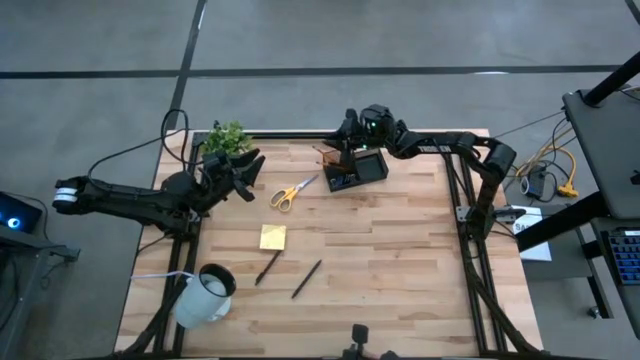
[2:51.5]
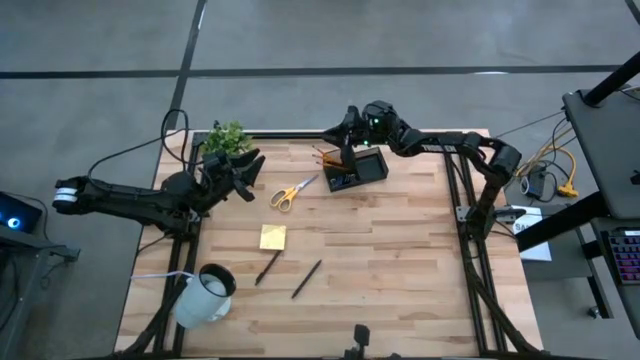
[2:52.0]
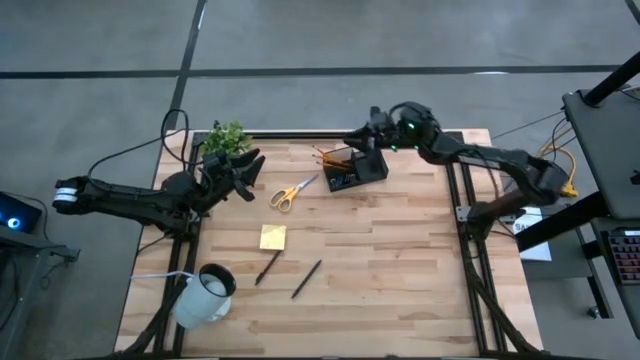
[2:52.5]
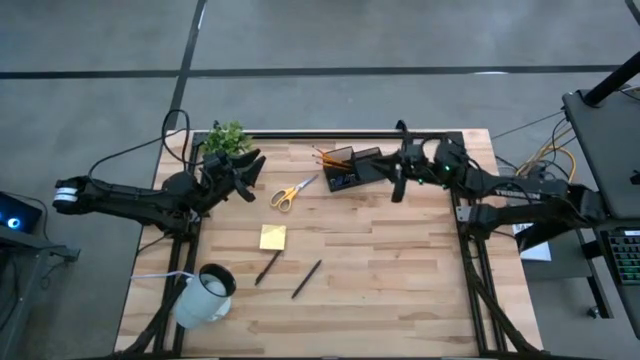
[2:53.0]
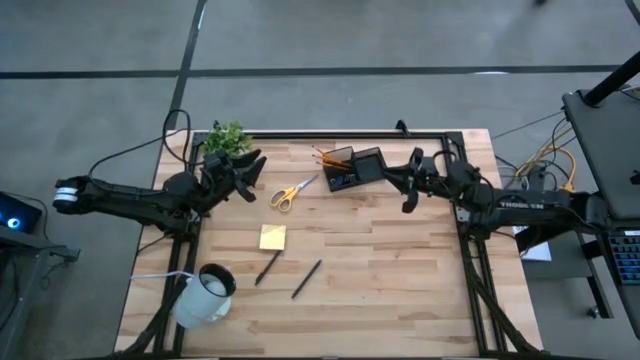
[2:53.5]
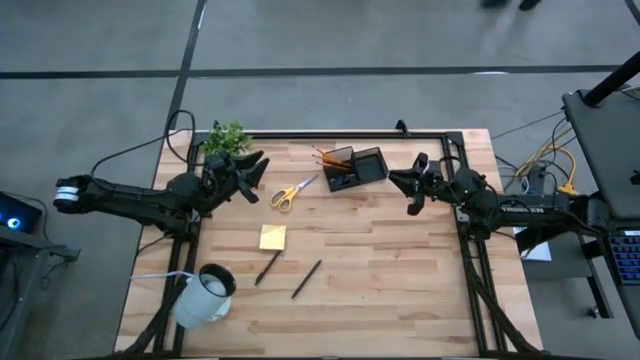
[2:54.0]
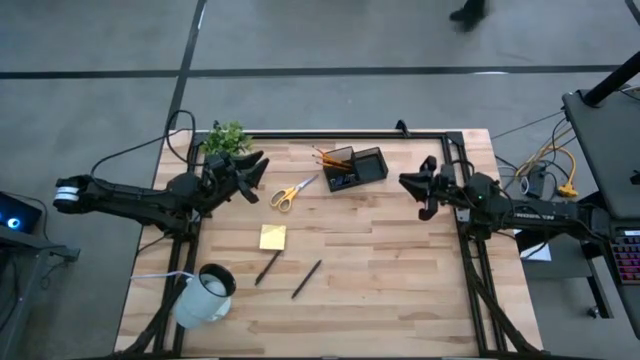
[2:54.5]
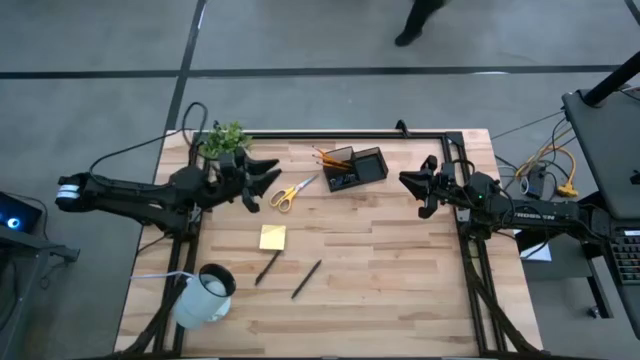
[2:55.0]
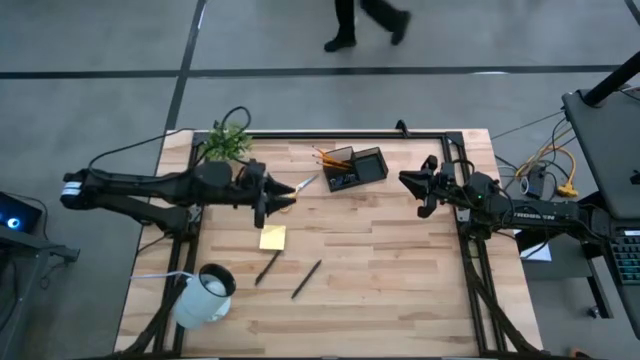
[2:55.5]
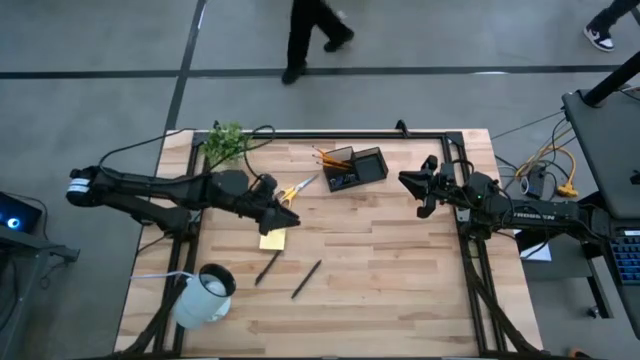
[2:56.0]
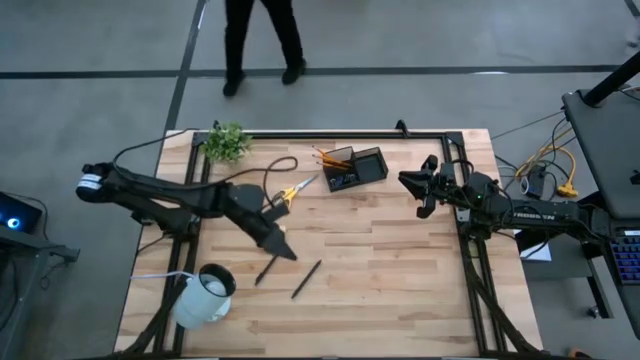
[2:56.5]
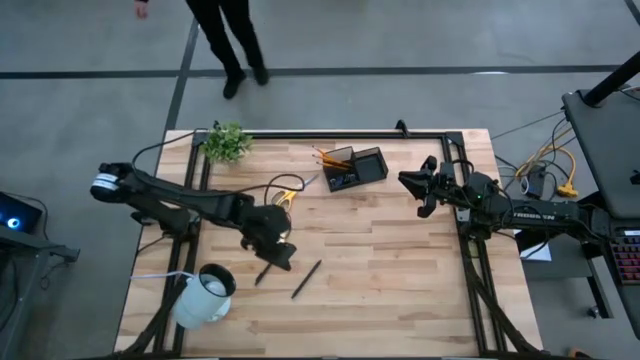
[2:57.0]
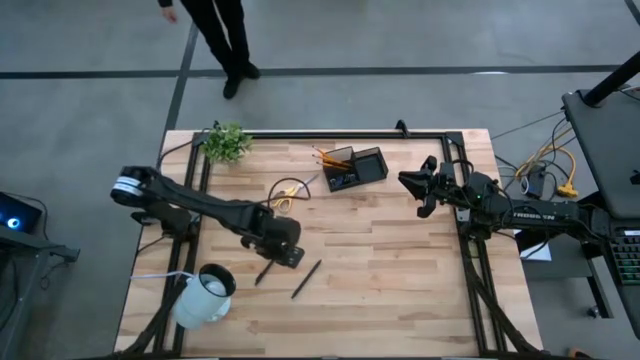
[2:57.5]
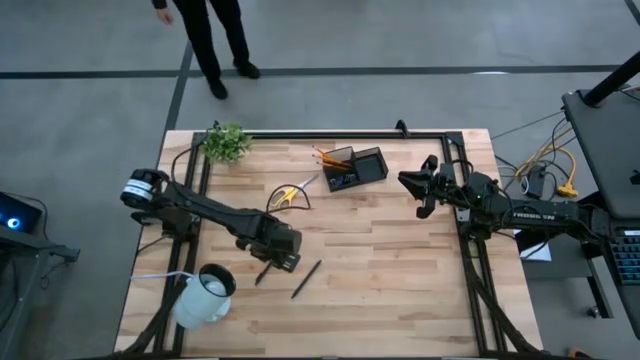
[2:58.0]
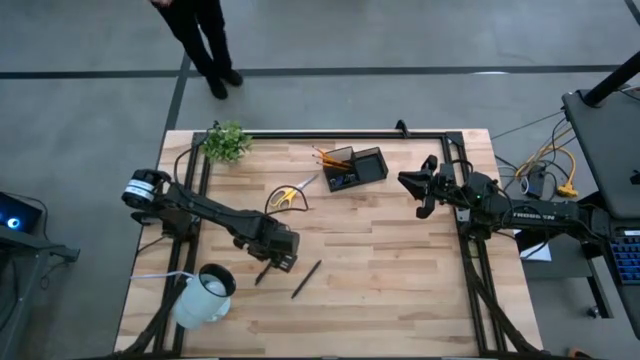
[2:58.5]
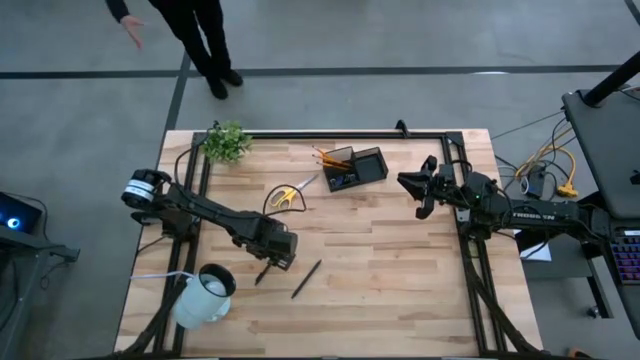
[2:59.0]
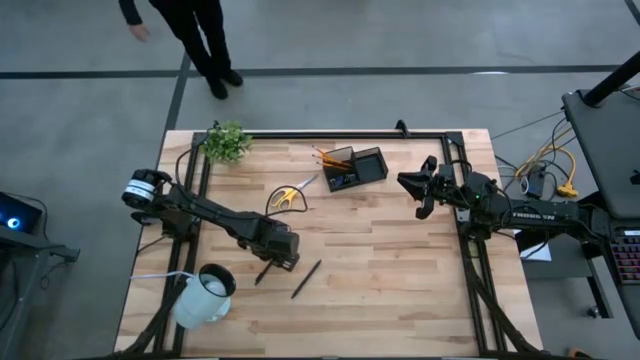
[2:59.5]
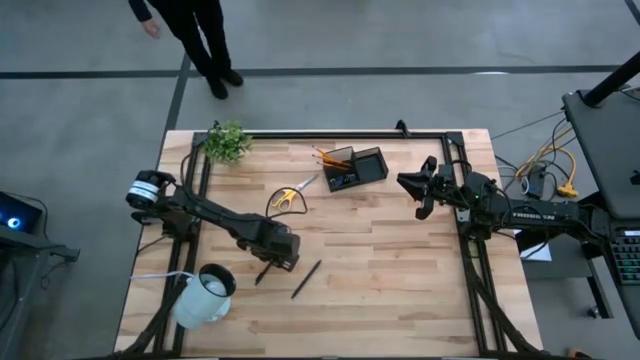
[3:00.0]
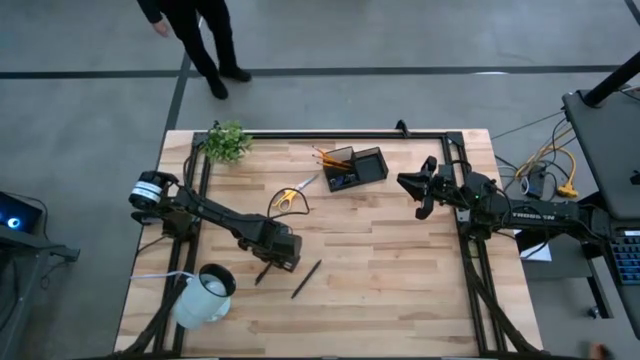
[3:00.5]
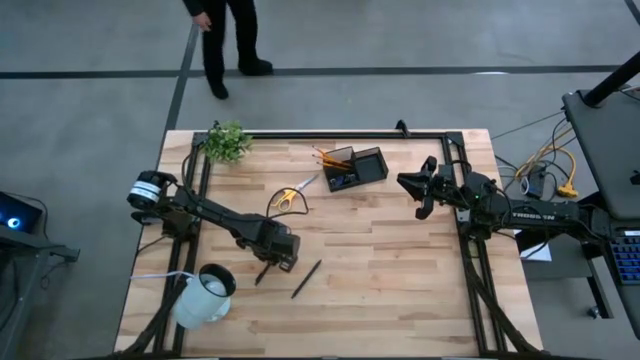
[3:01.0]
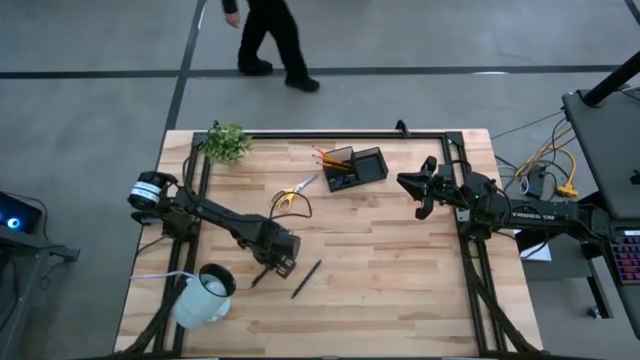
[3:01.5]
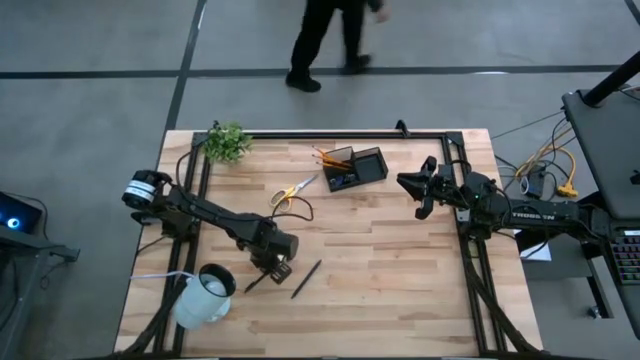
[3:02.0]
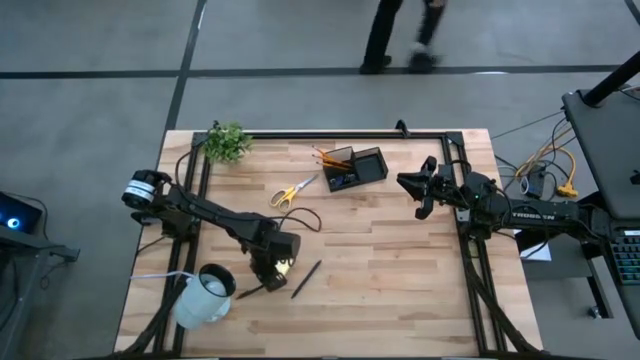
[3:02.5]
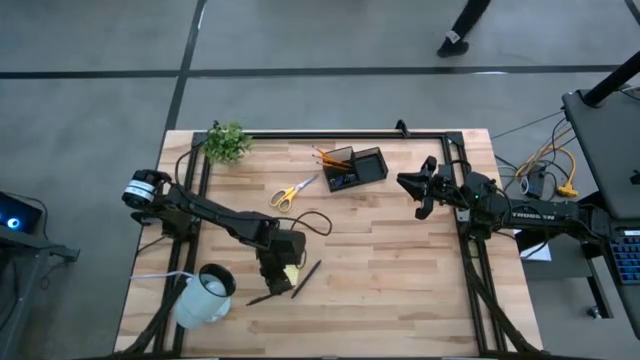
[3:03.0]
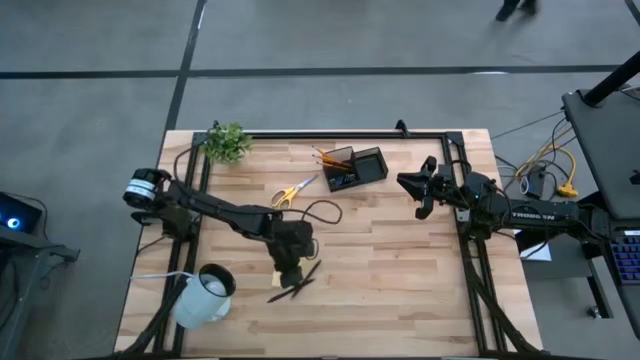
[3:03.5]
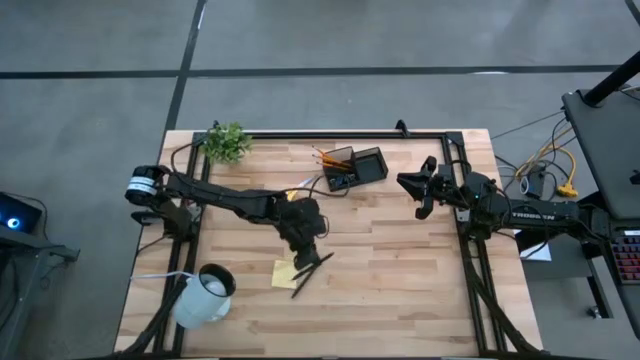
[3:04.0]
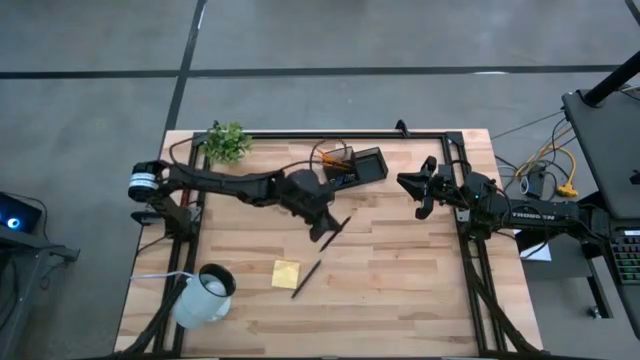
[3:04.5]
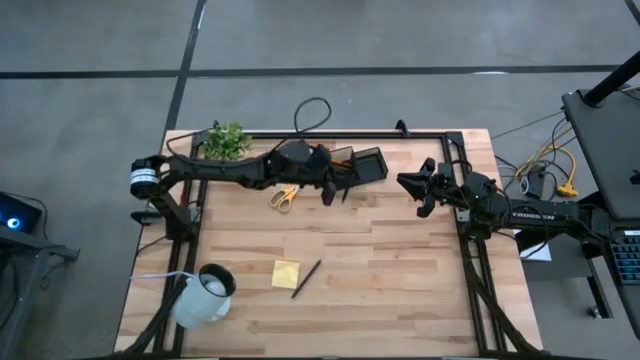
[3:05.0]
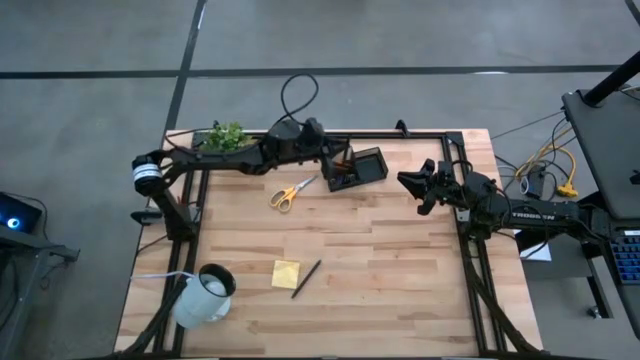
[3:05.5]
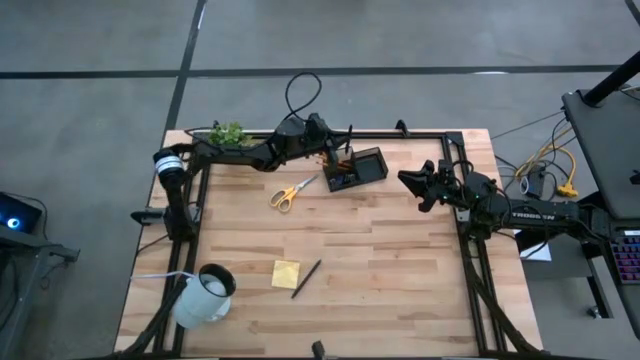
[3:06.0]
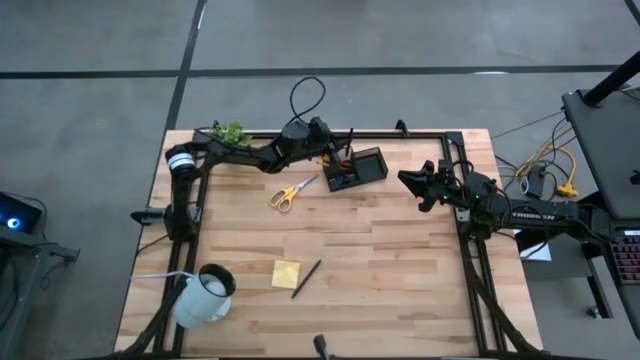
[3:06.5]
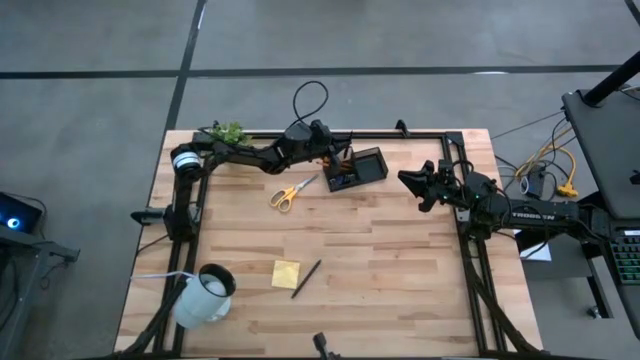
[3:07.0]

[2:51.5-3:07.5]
Task: Pick and place office supplies into organizer
Put the left pen into the desk organizer

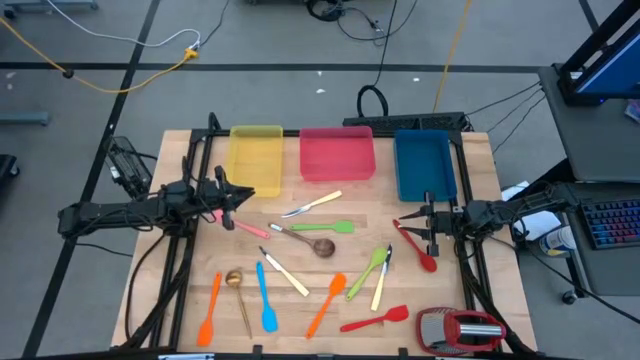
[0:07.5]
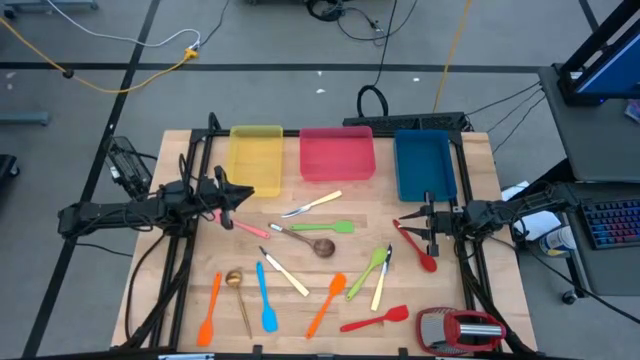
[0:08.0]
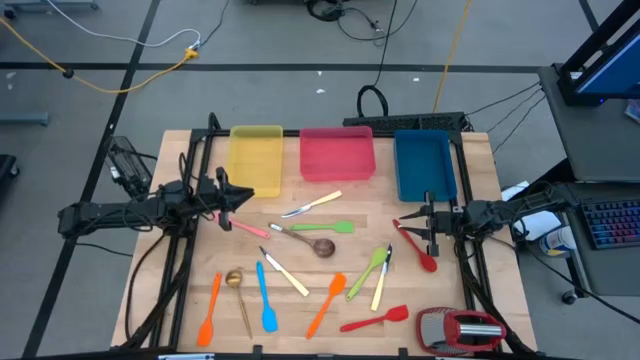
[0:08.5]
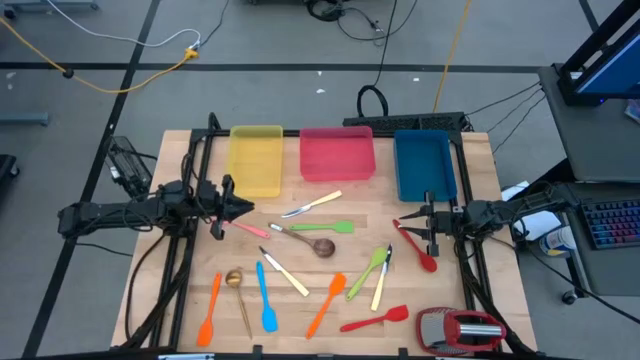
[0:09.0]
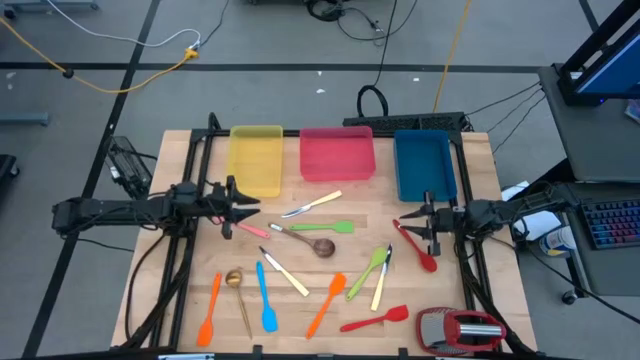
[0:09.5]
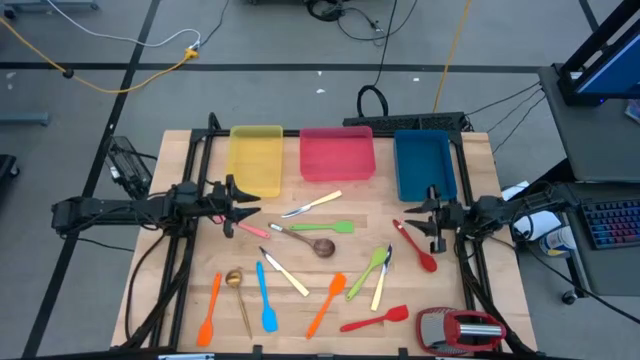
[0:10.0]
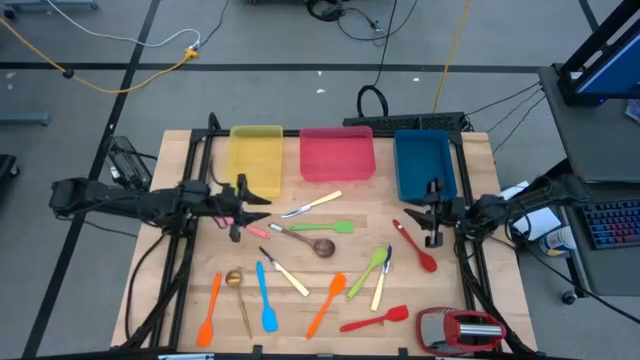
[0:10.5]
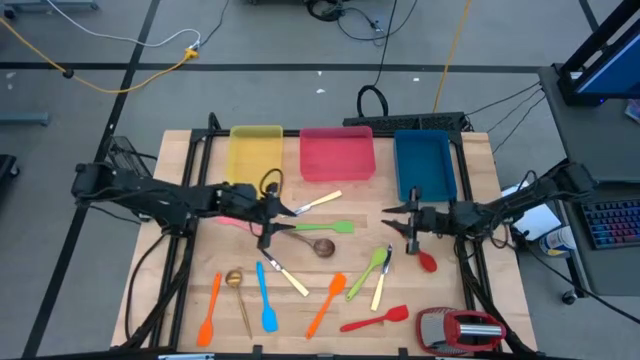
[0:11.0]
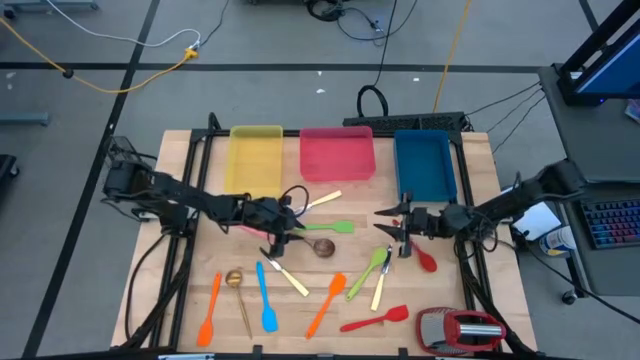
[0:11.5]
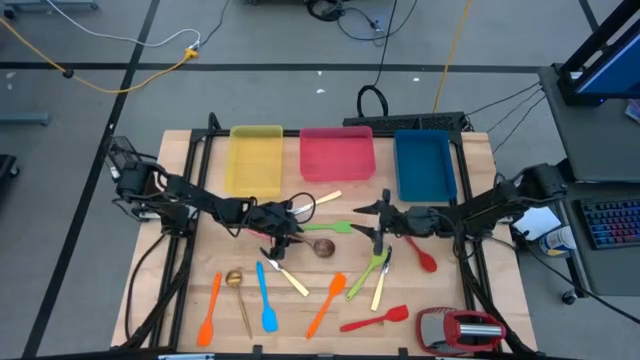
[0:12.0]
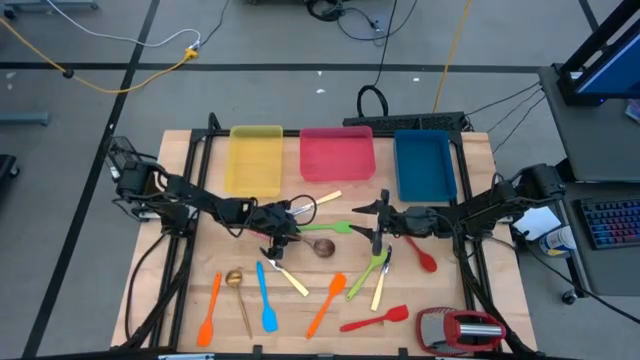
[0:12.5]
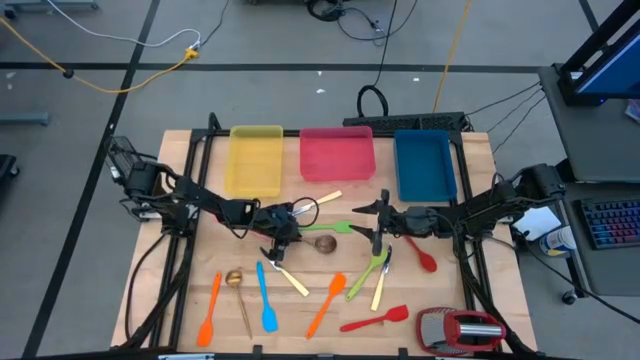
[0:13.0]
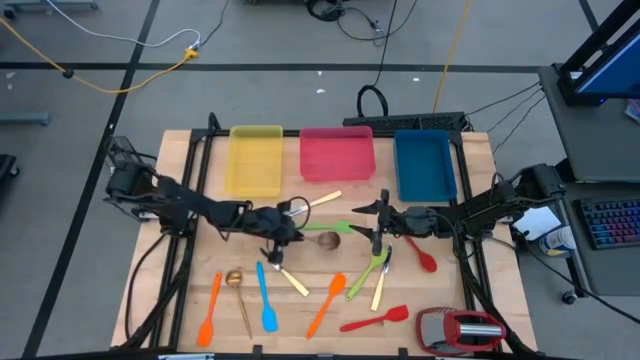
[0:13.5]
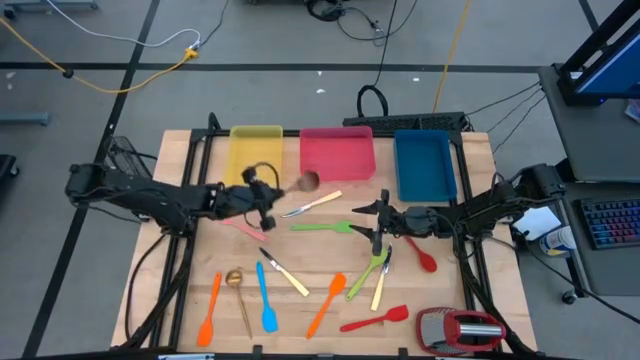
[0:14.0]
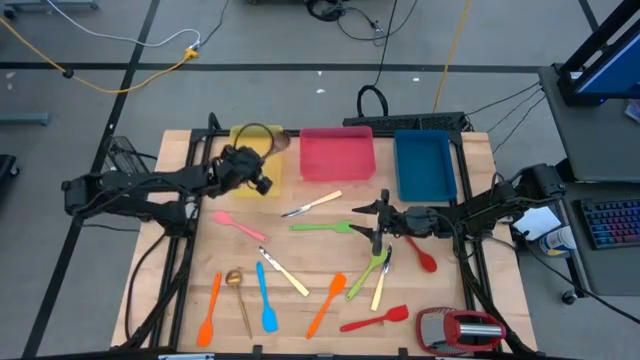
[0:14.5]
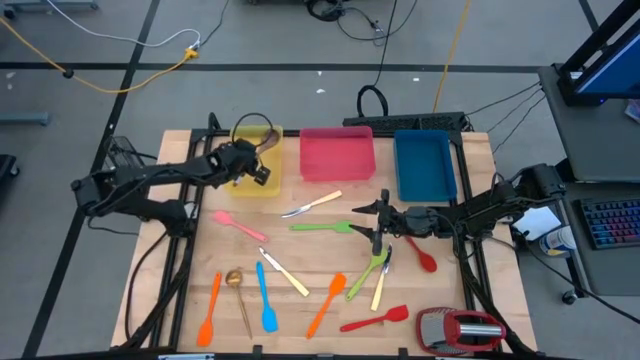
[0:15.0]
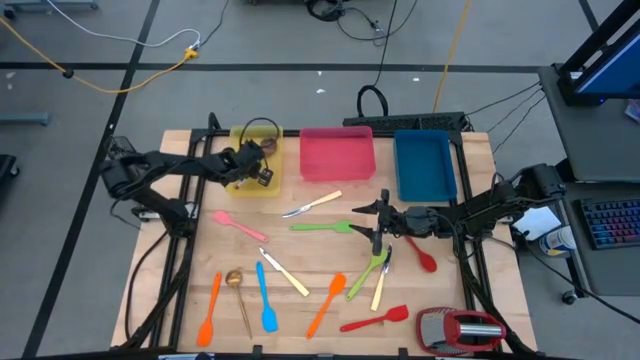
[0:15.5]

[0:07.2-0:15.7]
Task: Pick & Place Kitchen Items
Put the wooden serving spoon into the yellow bin
